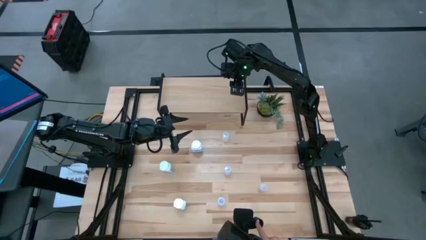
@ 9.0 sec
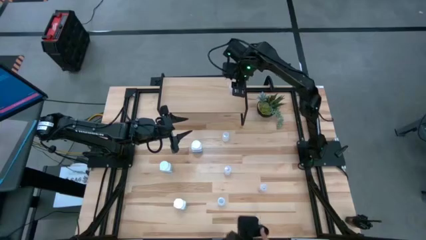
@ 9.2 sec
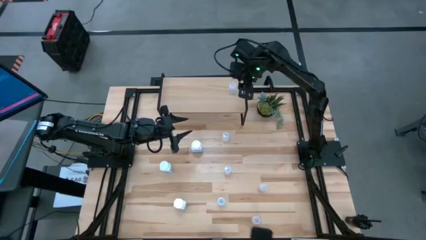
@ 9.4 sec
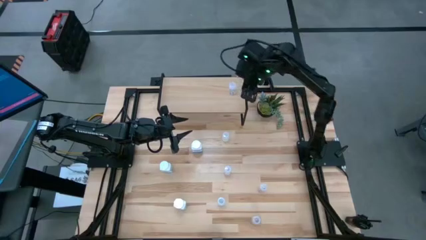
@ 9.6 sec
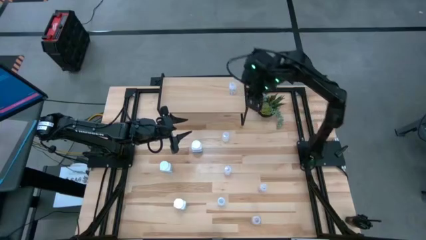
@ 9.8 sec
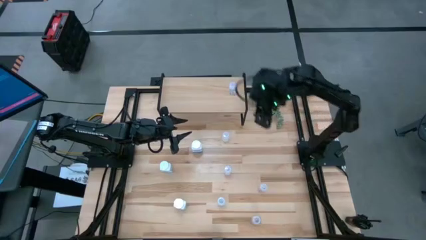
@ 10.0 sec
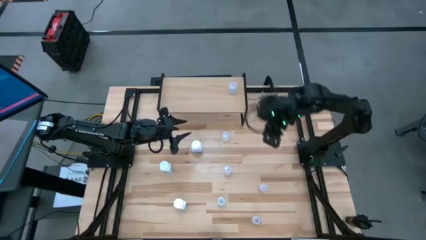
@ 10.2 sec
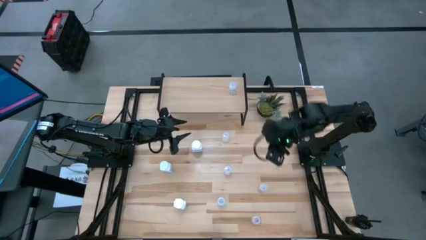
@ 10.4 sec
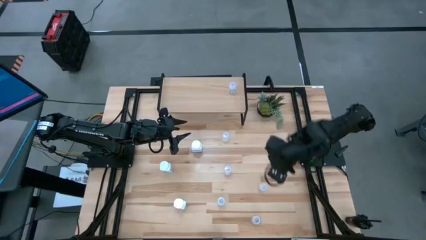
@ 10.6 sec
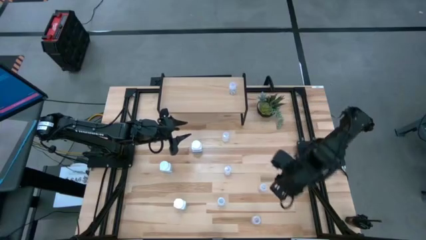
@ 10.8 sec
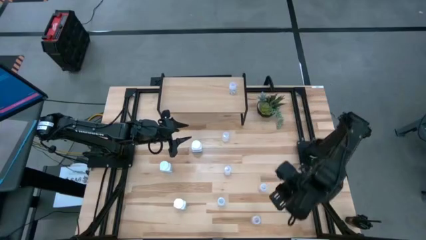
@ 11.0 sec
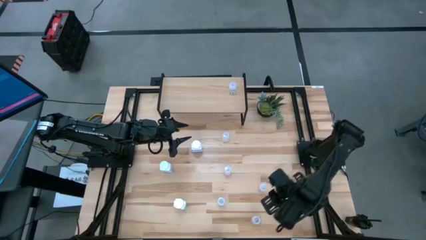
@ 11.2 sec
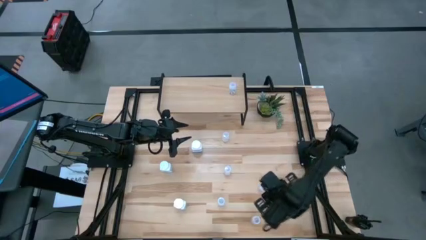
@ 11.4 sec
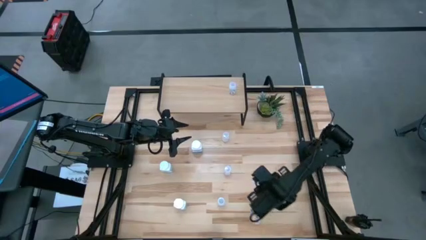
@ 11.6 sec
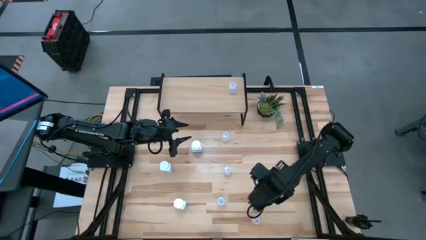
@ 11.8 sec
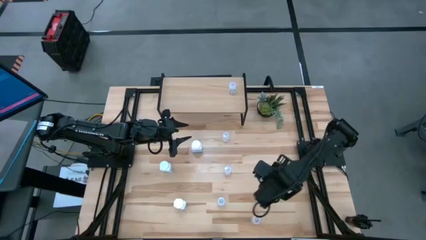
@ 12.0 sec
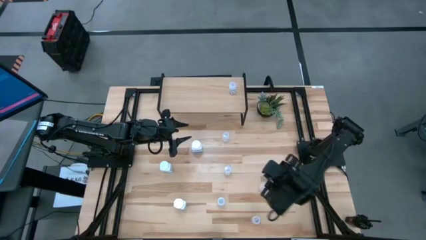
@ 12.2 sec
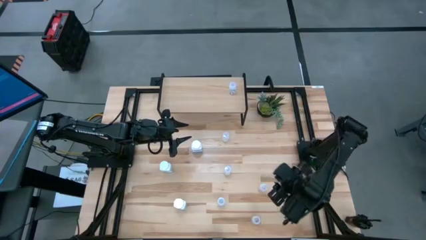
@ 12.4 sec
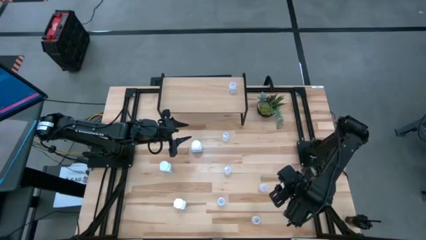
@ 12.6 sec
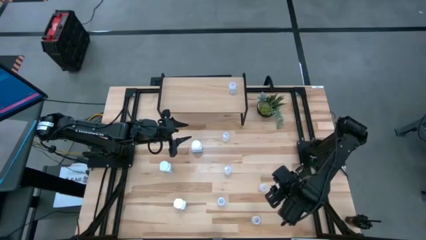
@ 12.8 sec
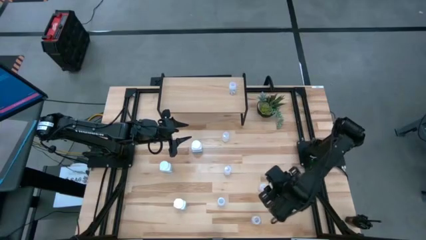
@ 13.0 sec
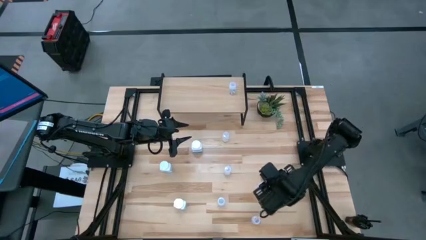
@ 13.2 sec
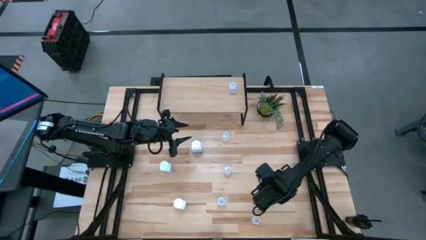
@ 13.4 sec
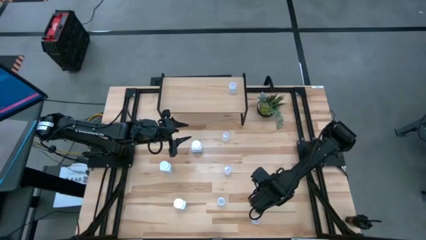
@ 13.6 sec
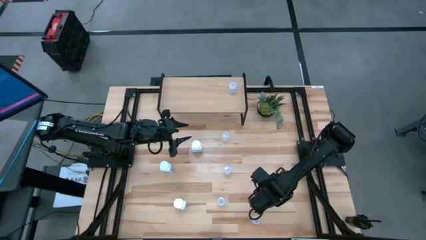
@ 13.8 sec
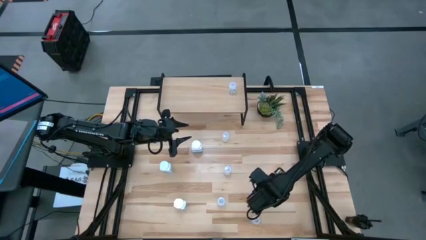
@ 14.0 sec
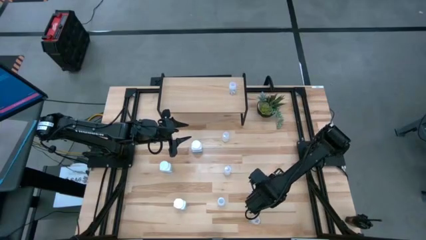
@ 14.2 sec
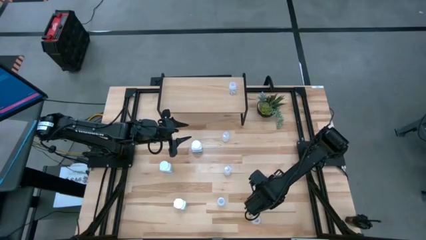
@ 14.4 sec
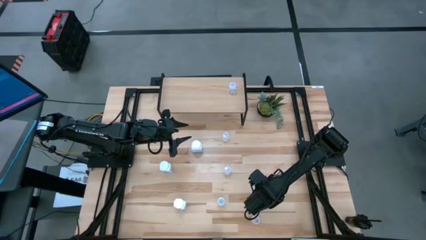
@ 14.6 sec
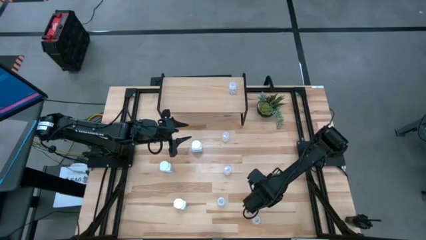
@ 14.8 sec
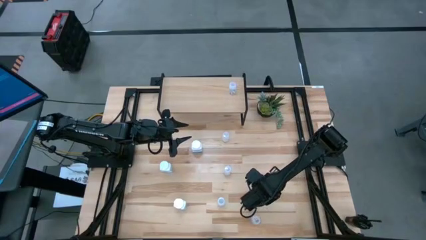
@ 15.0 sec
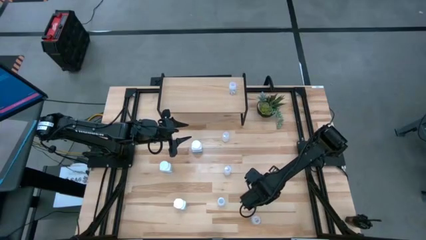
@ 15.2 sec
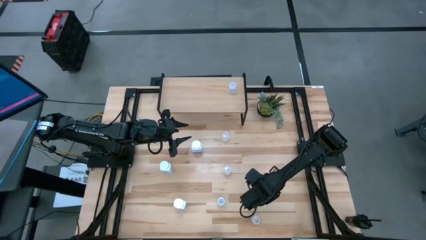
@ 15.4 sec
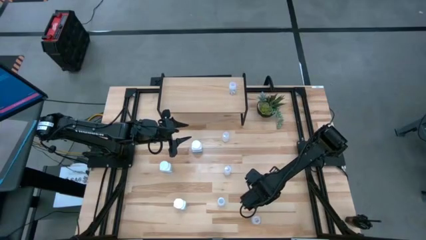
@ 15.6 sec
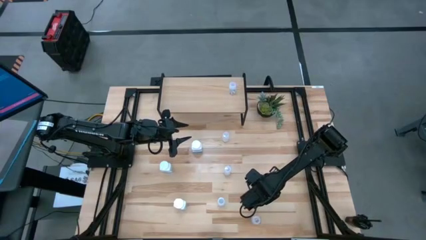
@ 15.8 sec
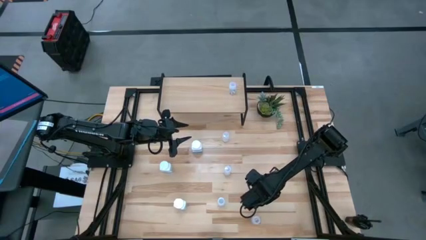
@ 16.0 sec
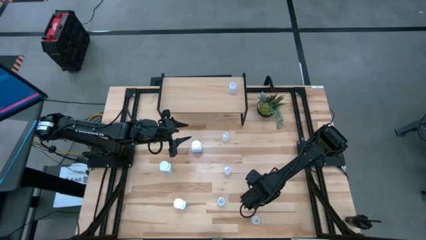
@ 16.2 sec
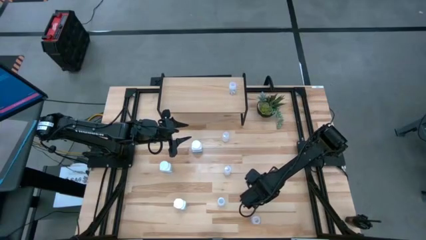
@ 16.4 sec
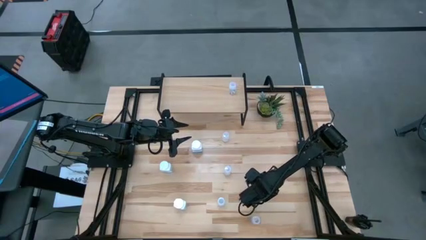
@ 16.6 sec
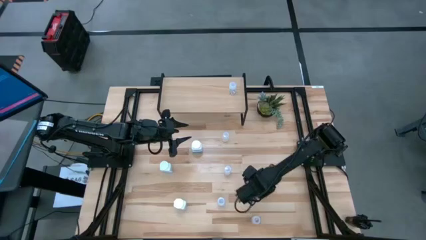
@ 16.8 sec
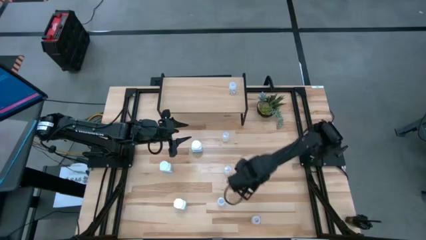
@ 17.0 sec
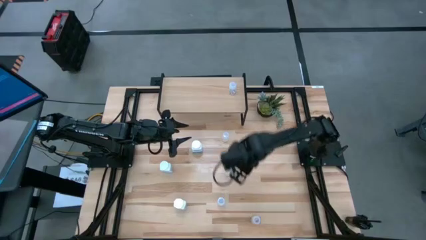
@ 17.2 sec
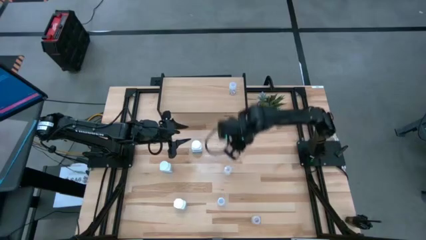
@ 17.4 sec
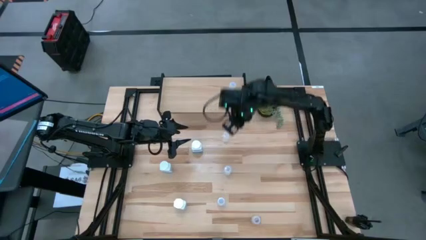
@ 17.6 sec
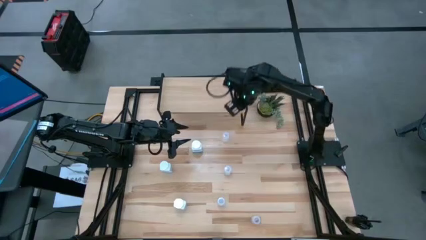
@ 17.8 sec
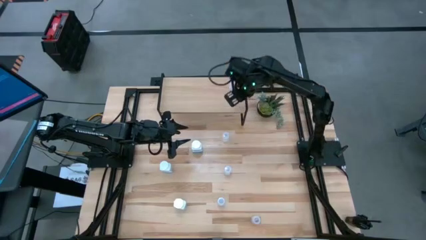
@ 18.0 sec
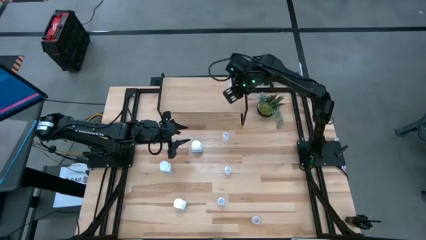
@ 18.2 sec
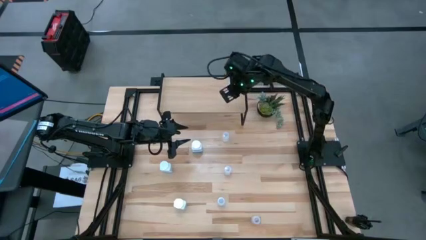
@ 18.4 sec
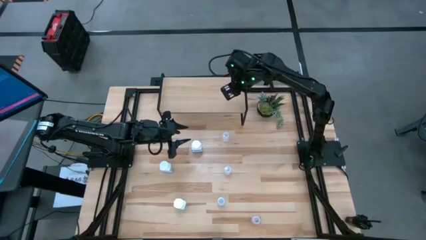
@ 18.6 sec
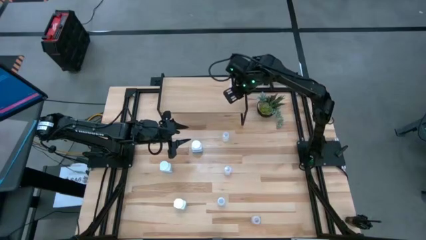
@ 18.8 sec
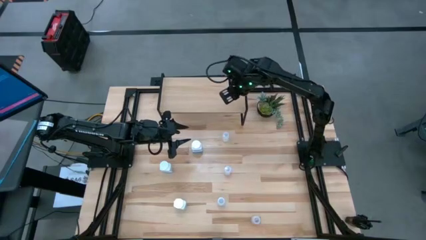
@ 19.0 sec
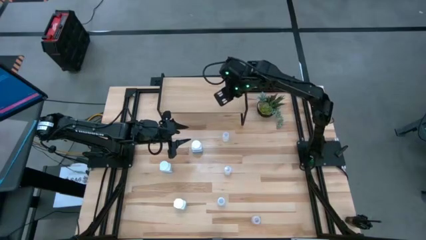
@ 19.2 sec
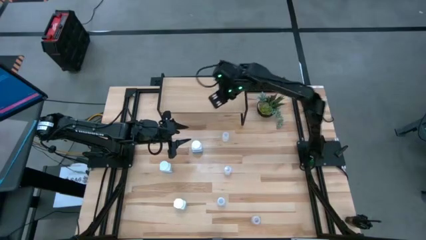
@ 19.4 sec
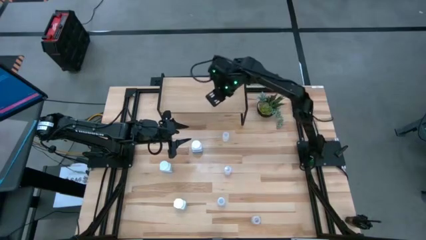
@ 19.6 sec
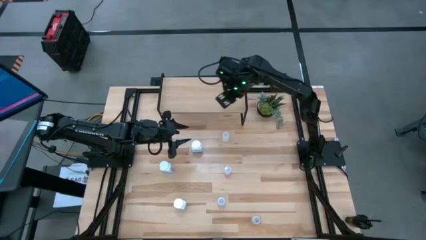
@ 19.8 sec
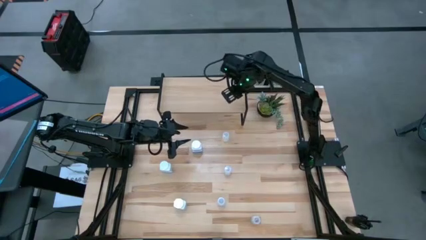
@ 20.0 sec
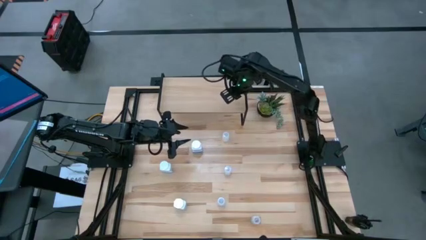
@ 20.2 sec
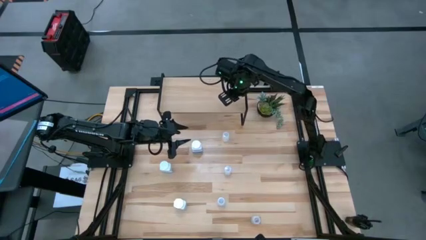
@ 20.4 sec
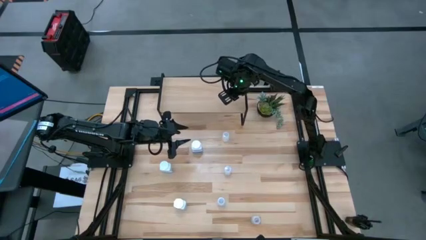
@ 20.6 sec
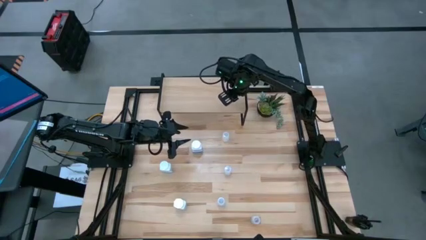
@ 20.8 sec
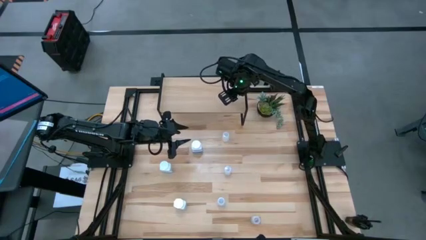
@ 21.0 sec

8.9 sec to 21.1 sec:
Task: Pick and place medicine bottles onto shelf by color
Put the transparent pill bottle on the shelf aligned with the other transparent pill bottle

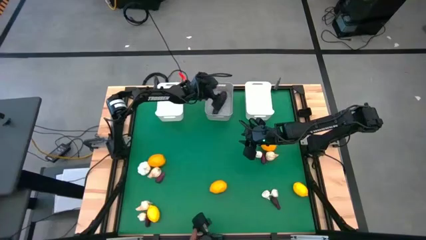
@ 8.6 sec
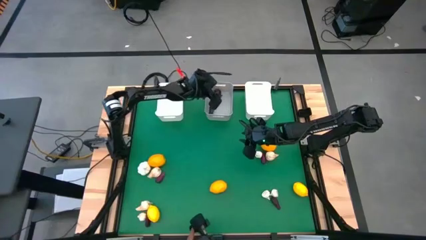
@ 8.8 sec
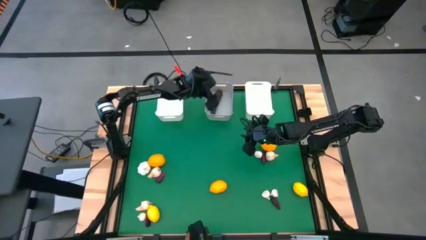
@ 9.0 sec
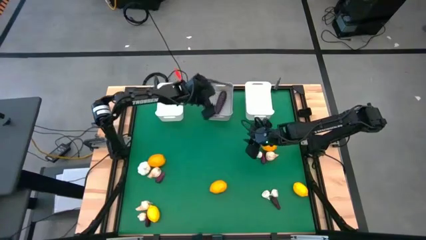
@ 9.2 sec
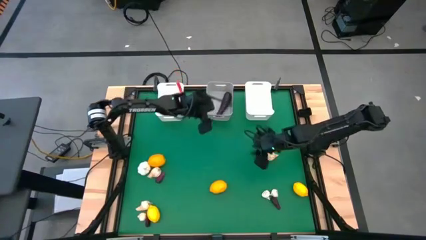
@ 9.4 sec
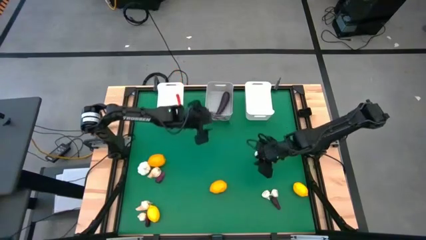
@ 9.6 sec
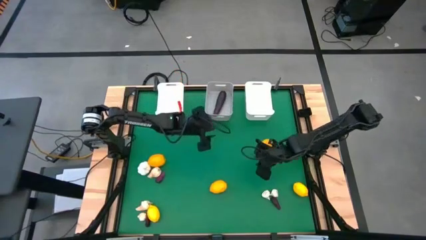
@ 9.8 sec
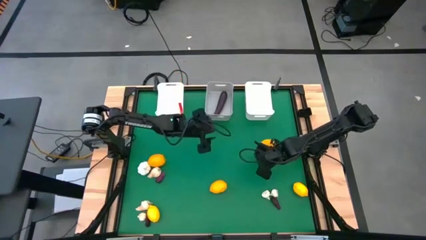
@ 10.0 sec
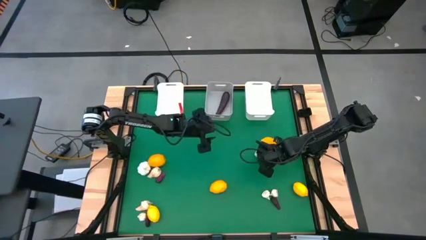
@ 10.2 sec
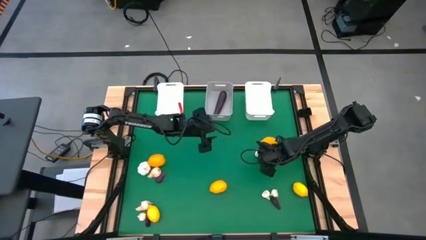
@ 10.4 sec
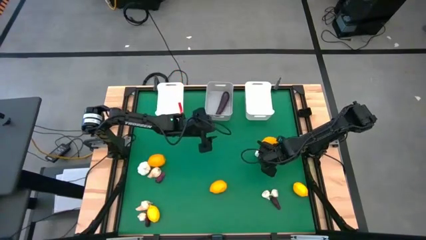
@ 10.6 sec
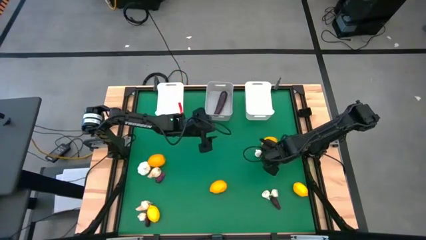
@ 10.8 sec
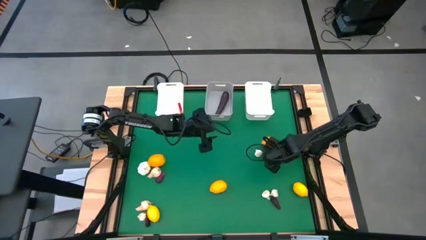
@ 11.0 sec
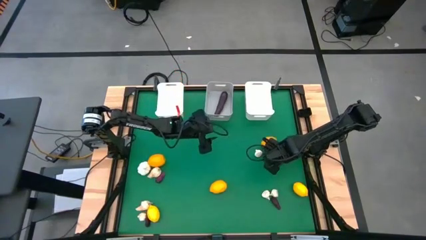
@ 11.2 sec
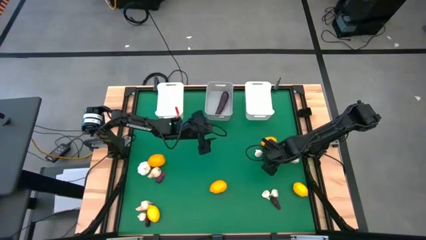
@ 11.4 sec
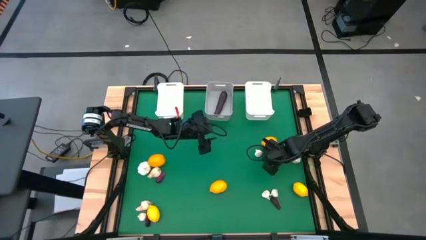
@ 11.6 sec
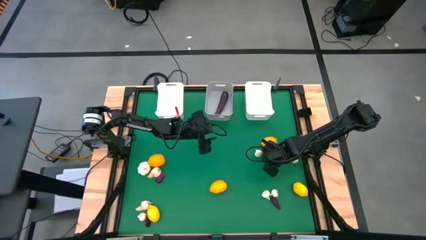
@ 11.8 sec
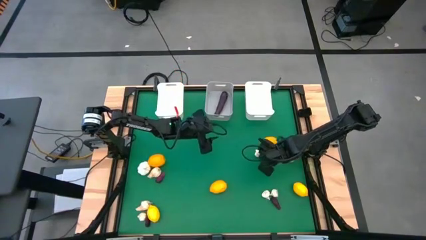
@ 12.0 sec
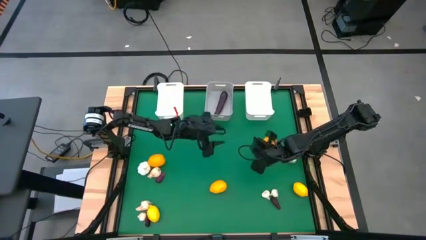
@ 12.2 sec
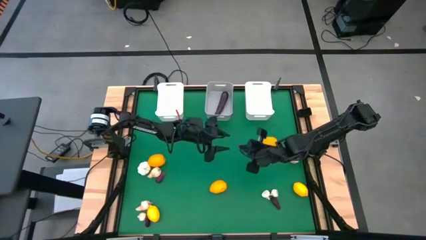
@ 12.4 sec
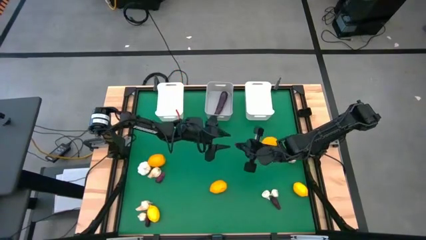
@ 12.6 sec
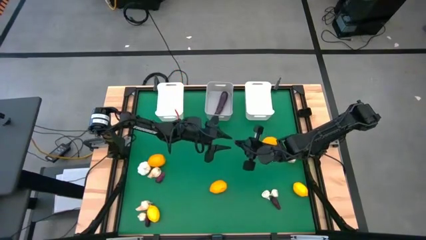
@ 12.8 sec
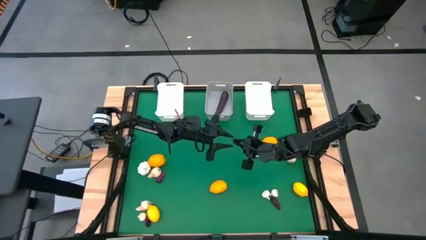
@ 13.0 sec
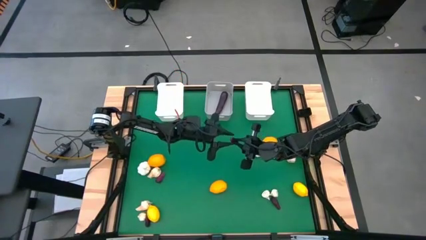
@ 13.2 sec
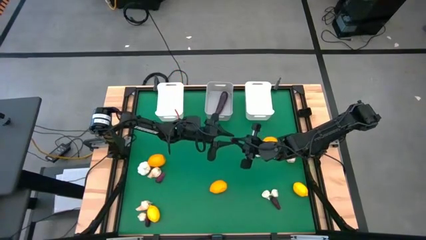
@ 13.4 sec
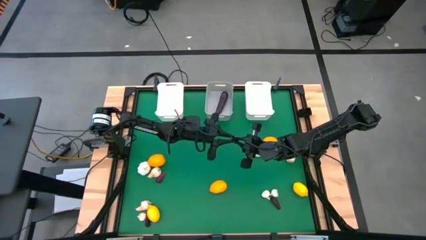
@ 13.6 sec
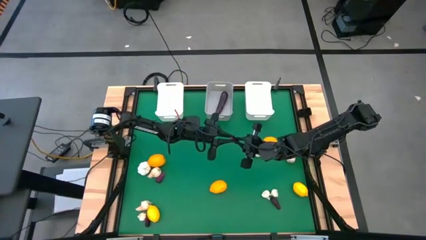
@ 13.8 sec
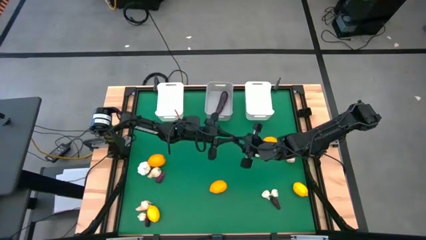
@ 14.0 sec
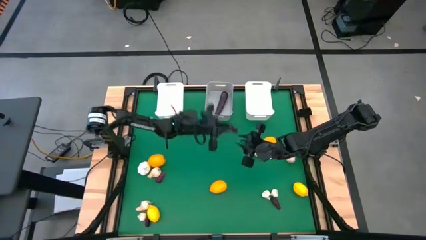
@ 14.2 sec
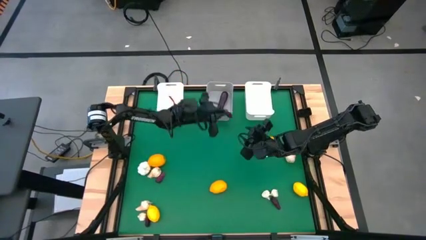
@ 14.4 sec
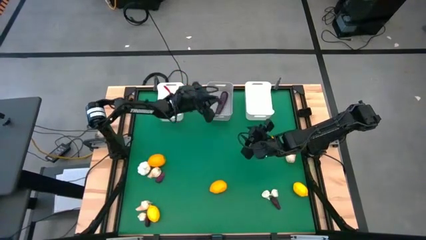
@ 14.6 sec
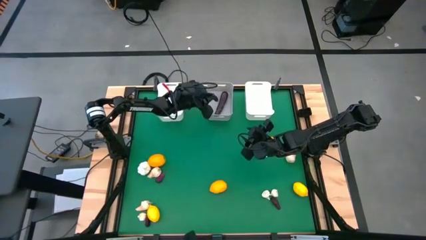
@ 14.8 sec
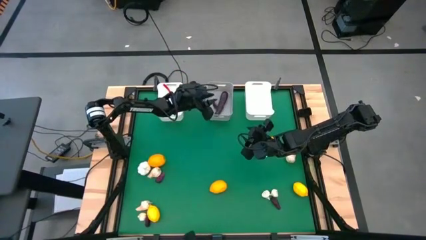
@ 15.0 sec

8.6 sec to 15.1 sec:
Task: Sort produce into baskets
Put the eggplant into the gray bin
